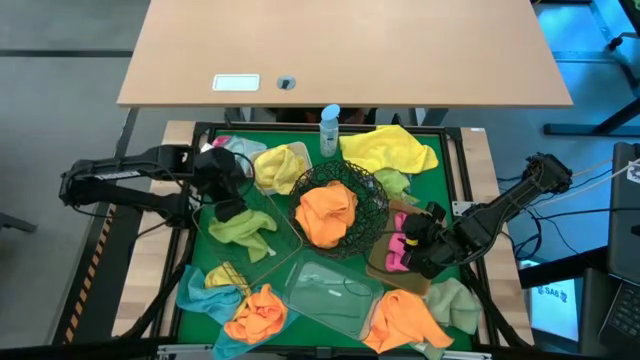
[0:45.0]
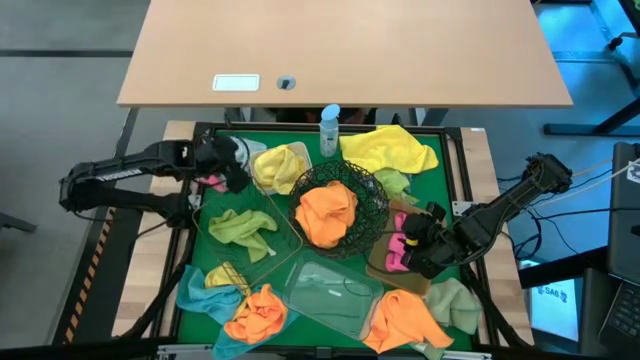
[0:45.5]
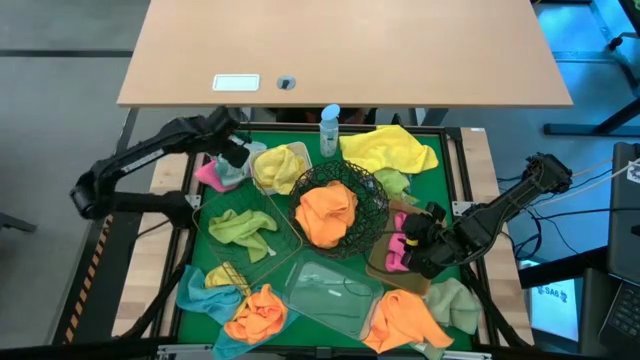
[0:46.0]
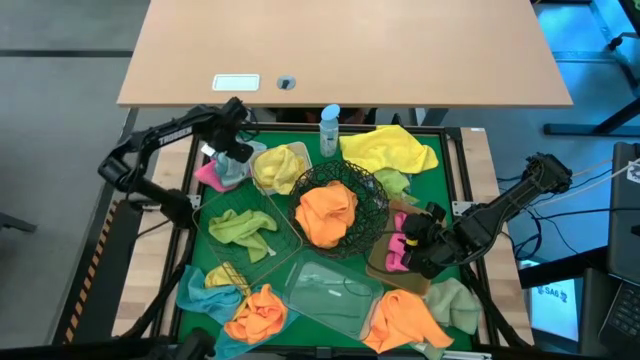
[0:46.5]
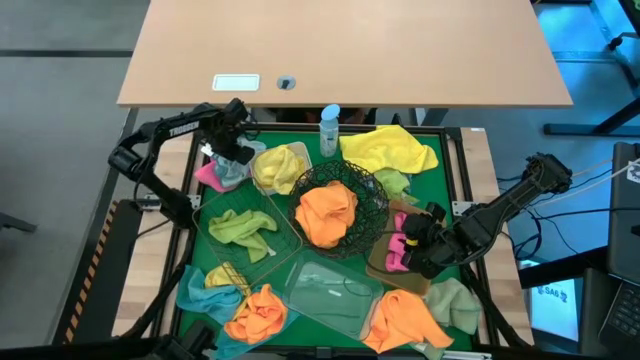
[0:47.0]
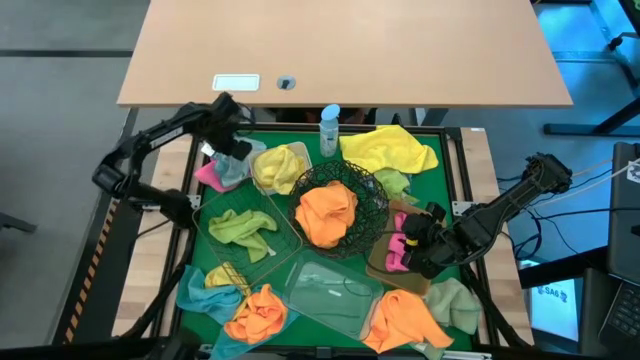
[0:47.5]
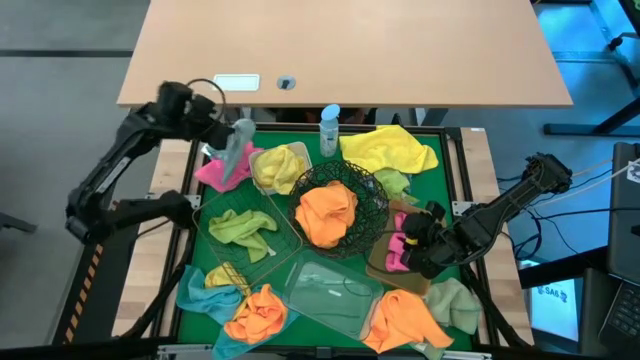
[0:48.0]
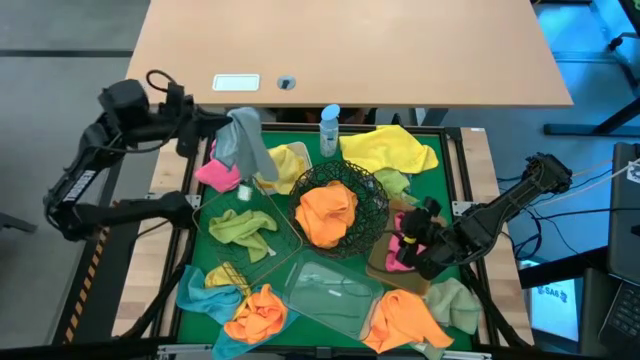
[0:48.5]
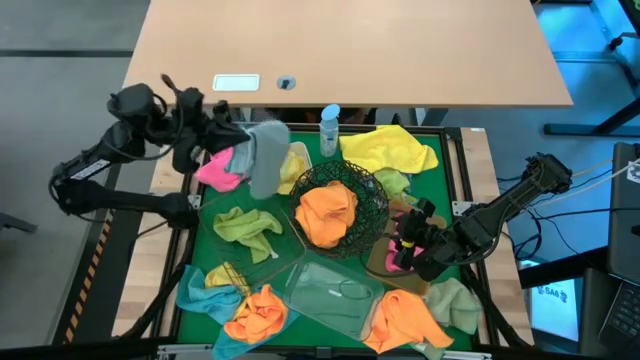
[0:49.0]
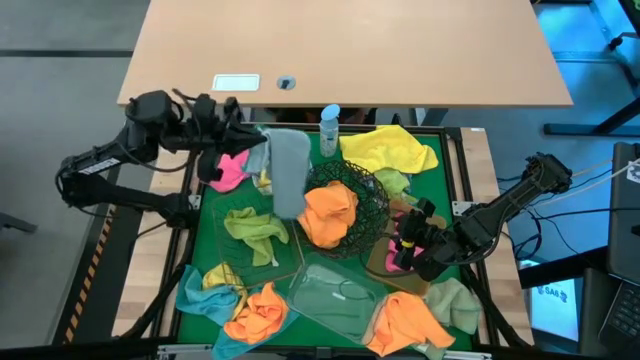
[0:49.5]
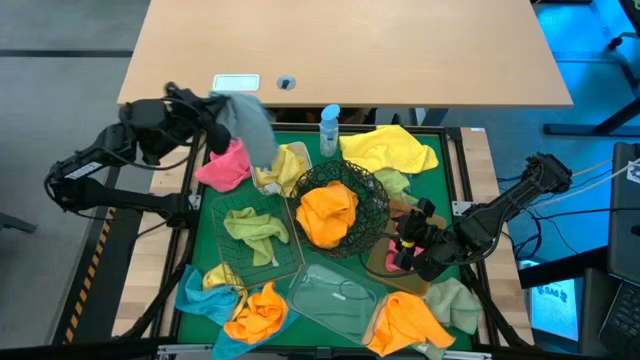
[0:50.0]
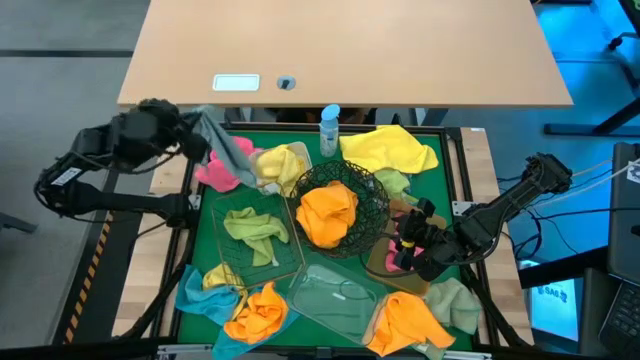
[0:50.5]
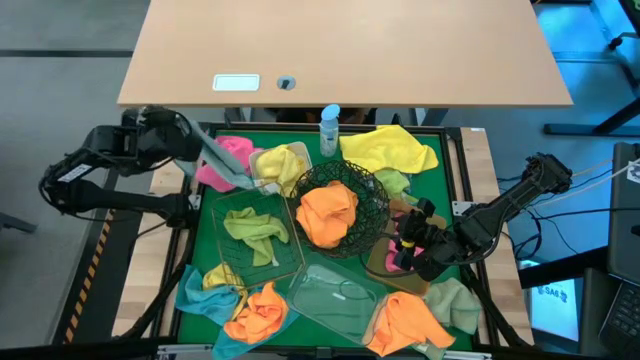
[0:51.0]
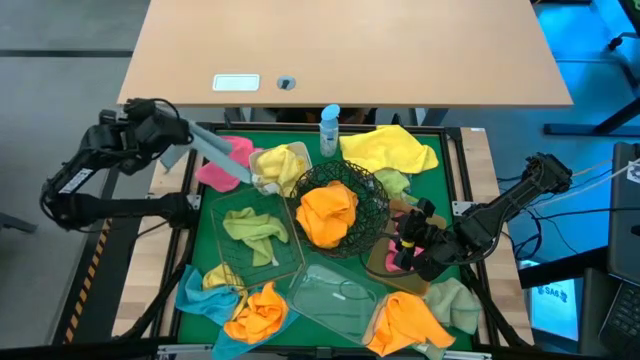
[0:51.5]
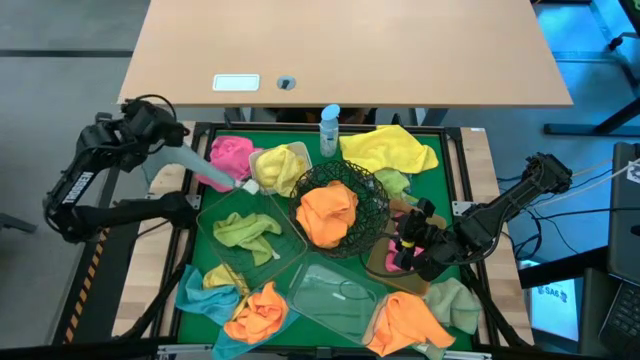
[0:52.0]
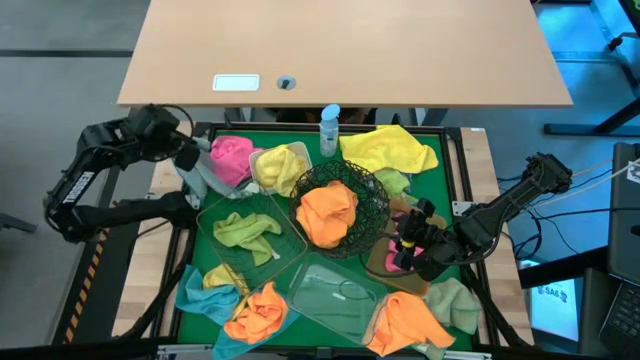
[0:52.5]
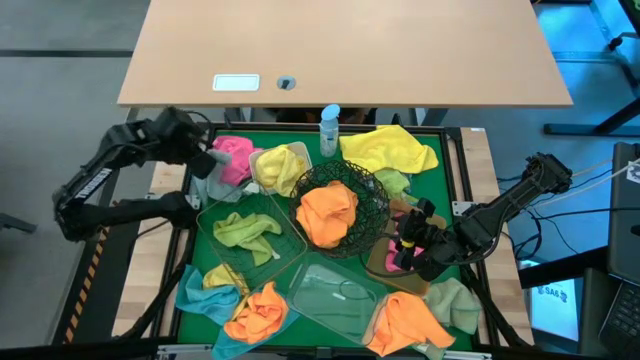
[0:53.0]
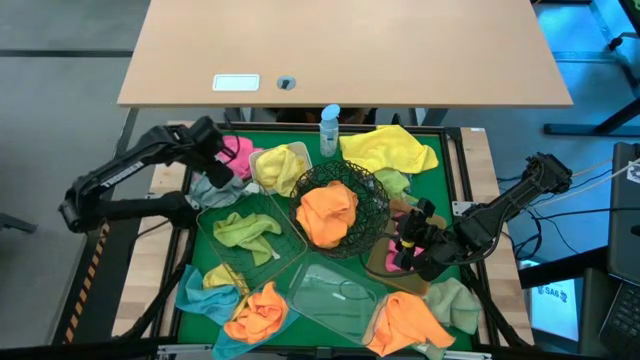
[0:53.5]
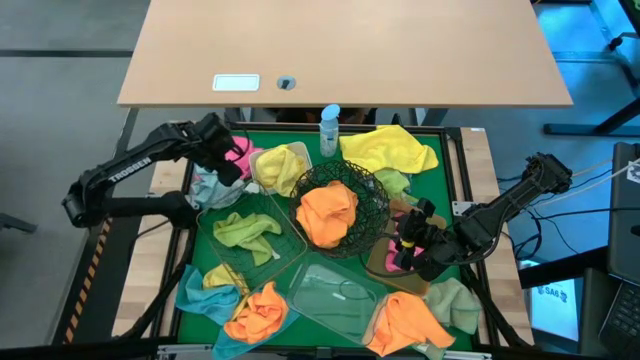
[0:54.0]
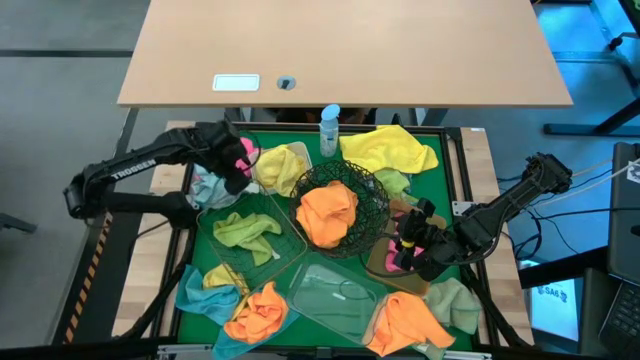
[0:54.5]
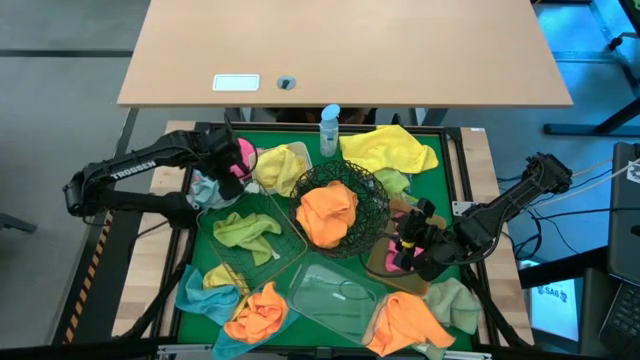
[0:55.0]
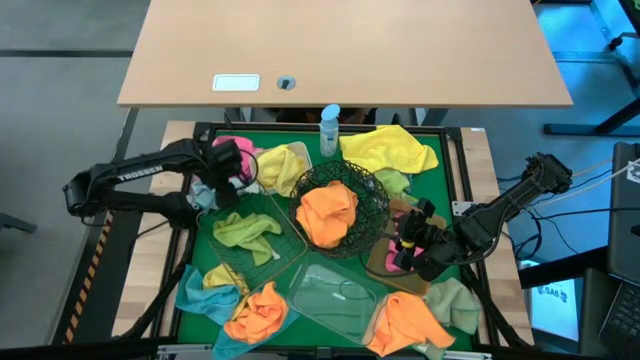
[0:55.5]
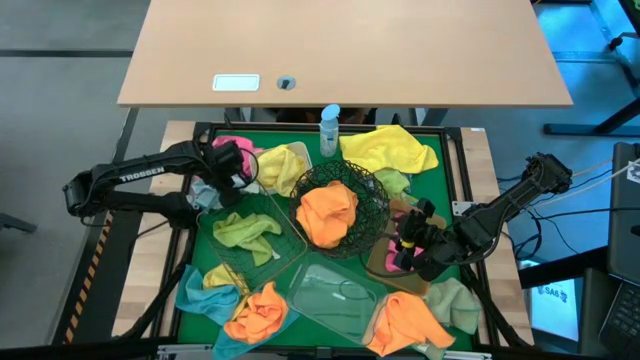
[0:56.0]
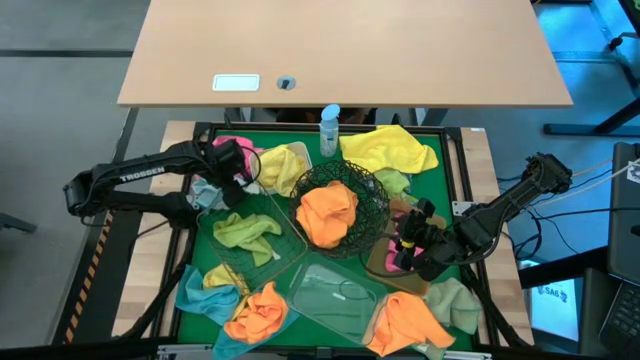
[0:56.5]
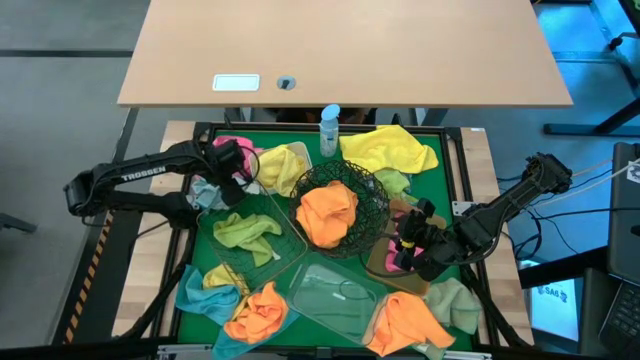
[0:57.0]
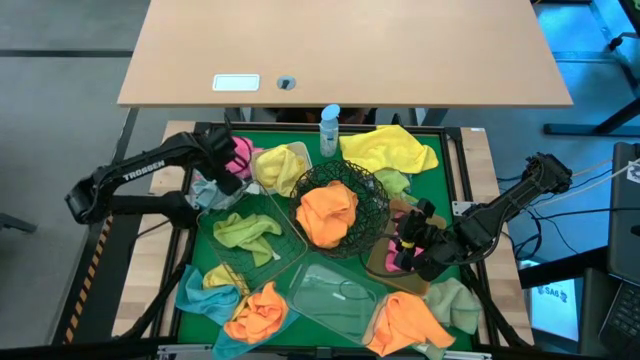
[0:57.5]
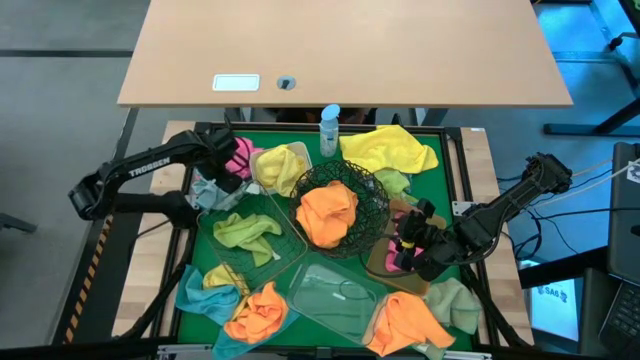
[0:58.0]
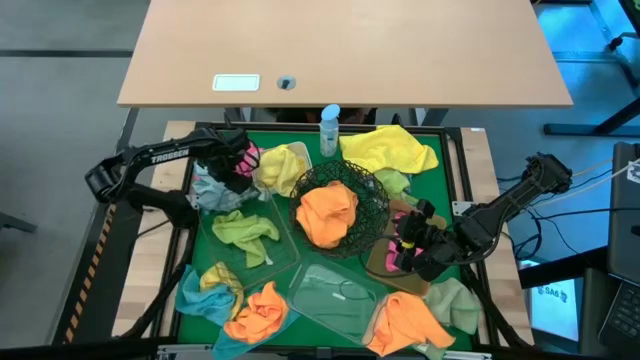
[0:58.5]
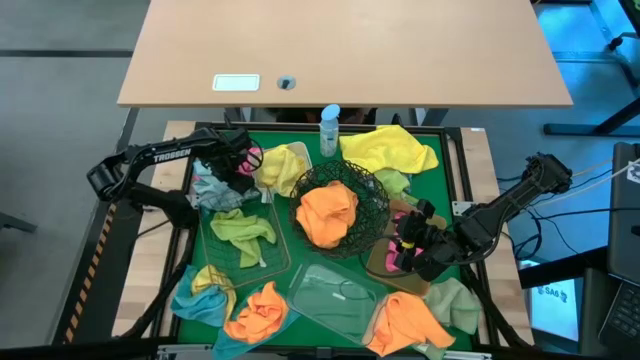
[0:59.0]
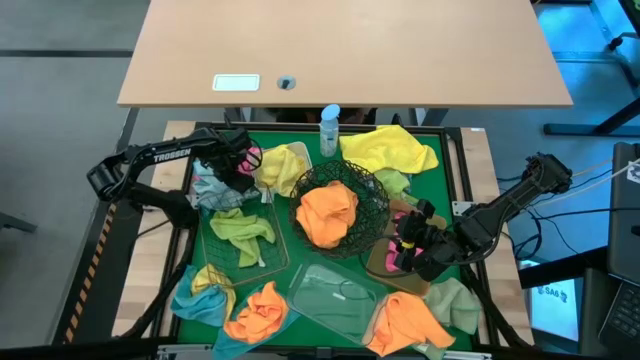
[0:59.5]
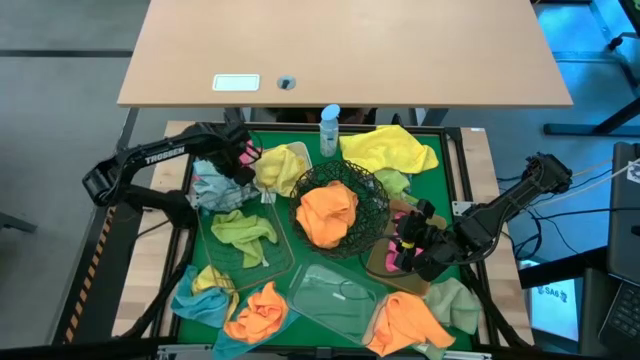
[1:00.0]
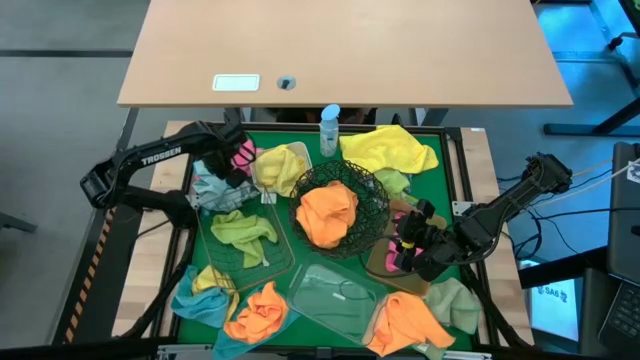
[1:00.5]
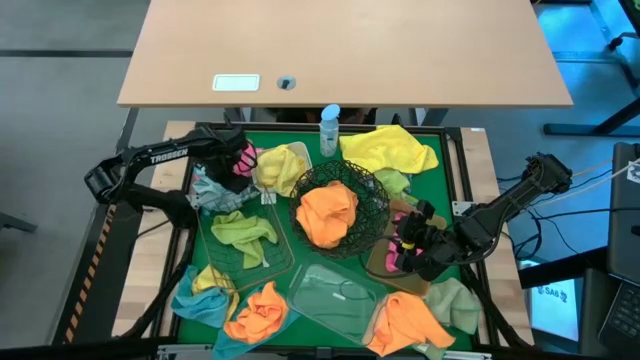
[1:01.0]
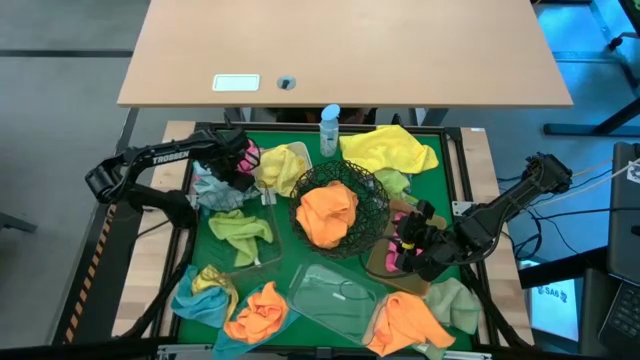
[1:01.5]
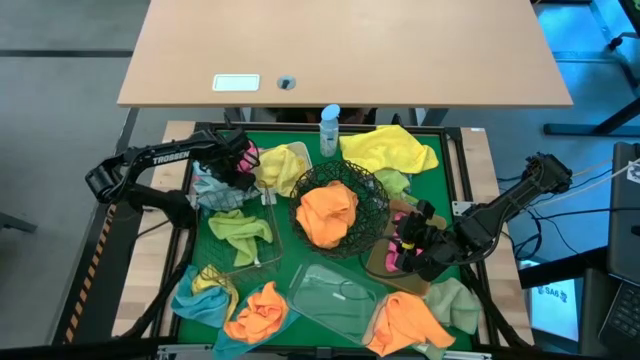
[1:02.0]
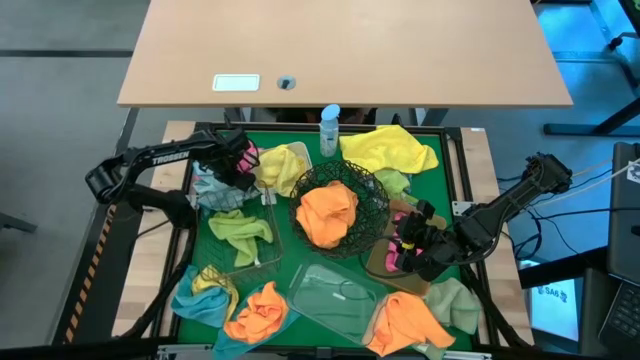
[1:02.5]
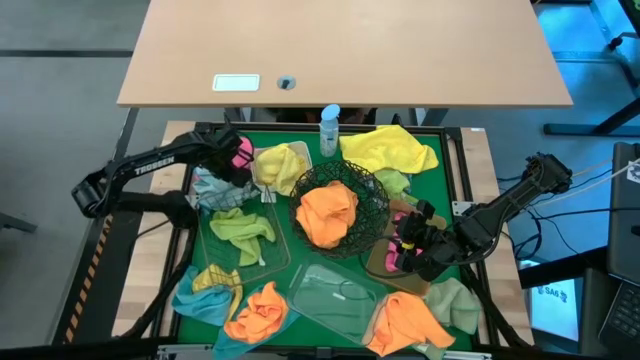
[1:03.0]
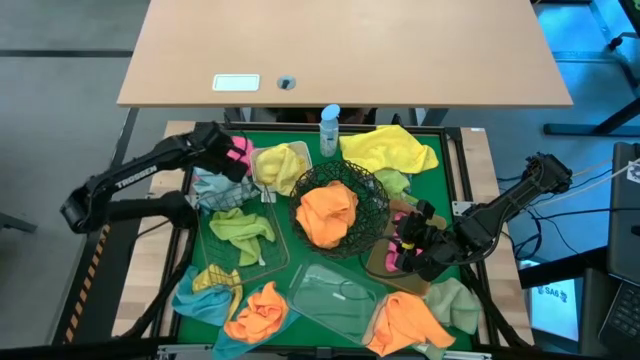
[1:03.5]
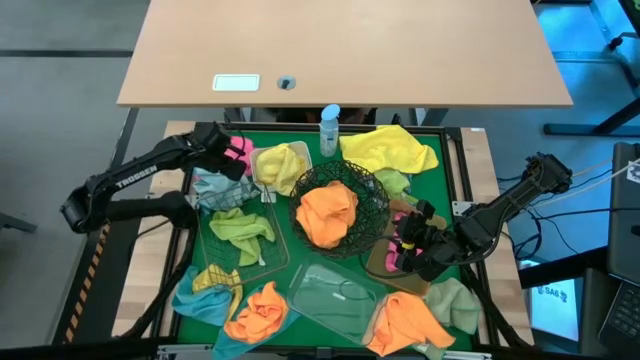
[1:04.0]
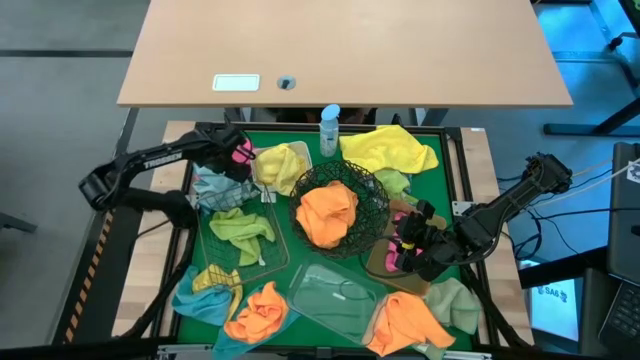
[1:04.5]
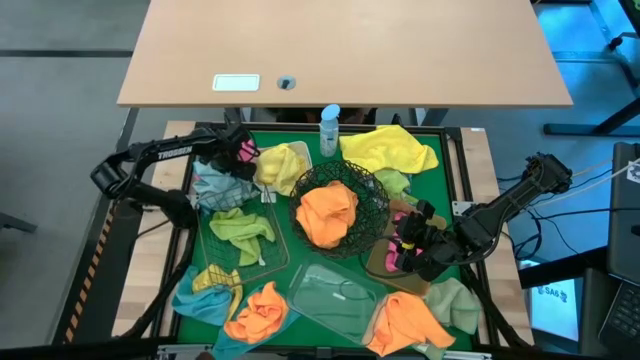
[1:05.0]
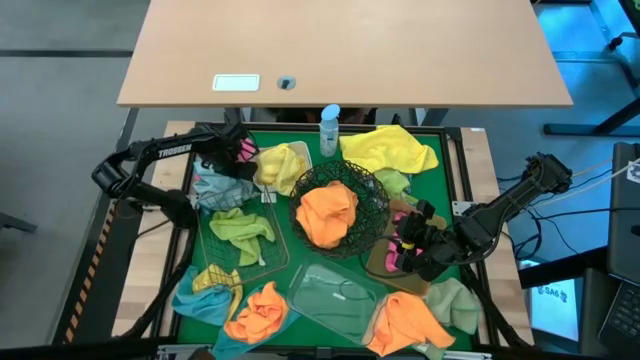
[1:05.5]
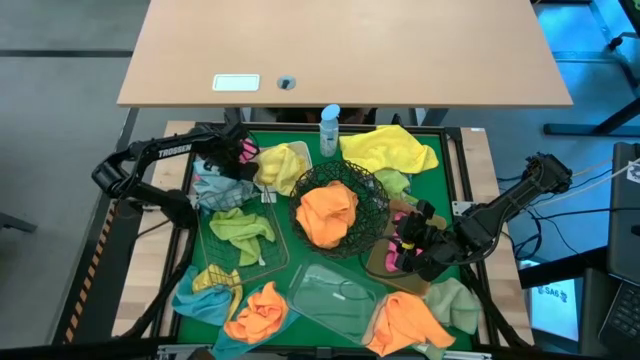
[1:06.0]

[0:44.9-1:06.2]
Task: Sort microfiber towel by color & place in baskets
Put the top light blue towel into the transparent bin
